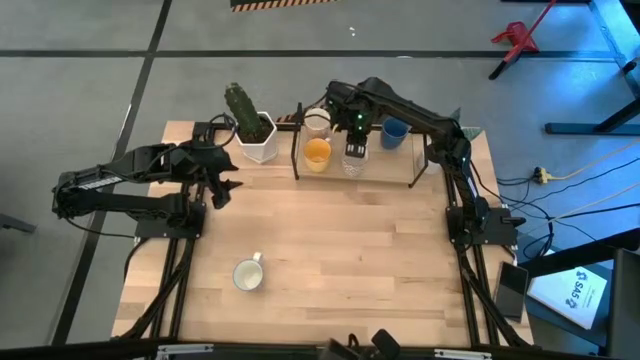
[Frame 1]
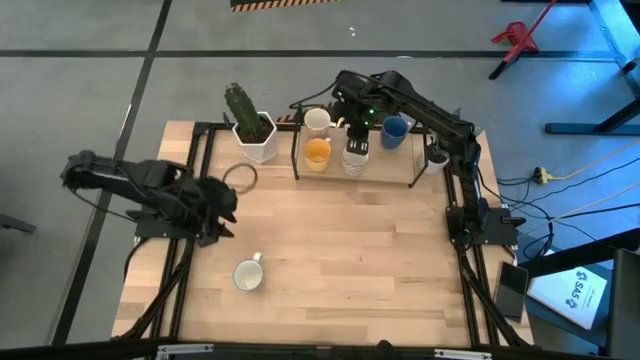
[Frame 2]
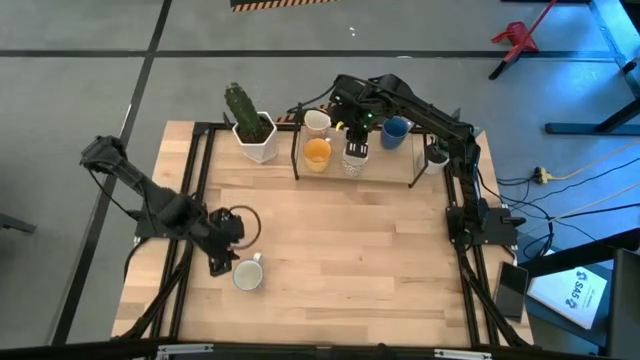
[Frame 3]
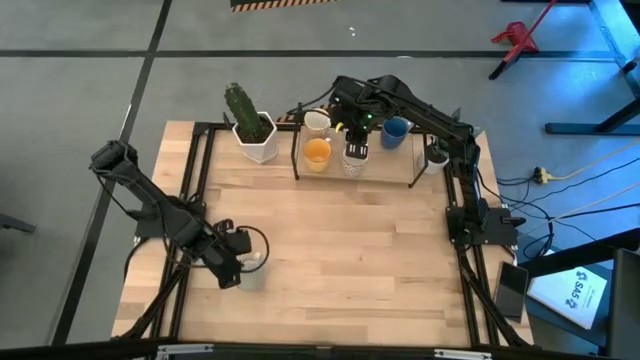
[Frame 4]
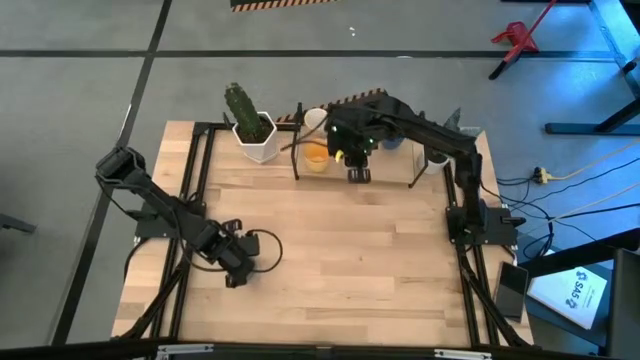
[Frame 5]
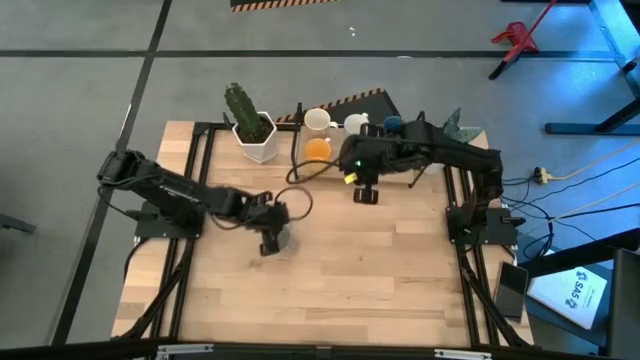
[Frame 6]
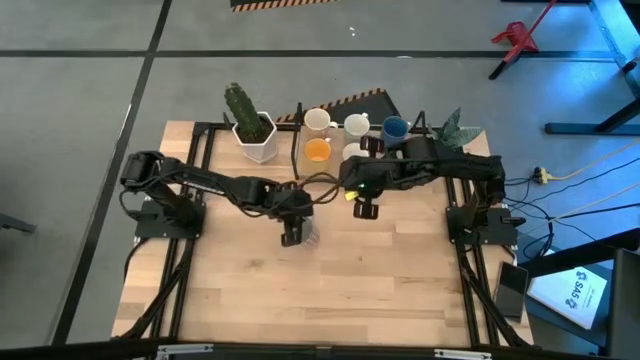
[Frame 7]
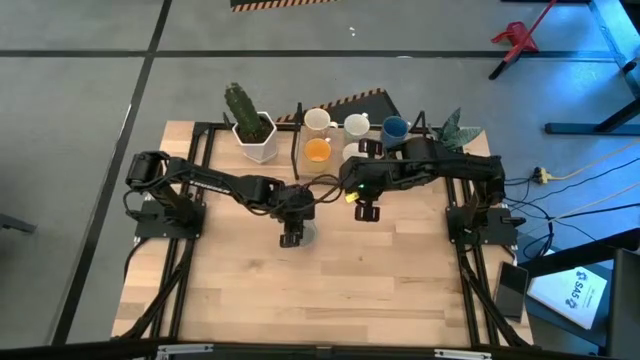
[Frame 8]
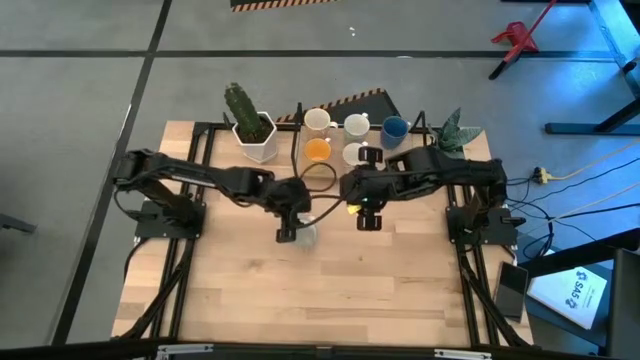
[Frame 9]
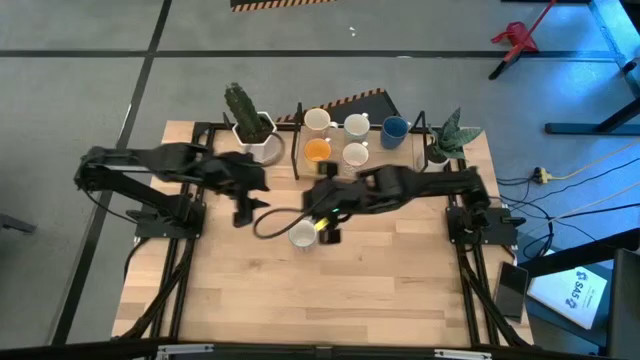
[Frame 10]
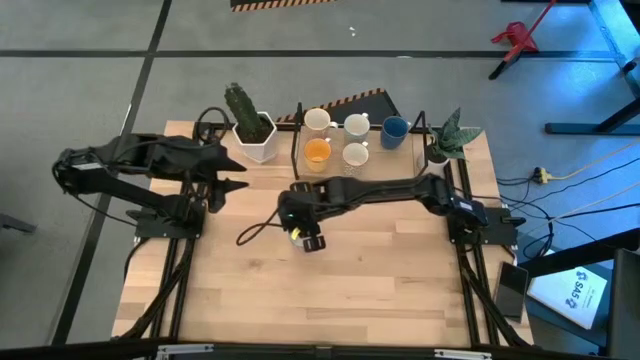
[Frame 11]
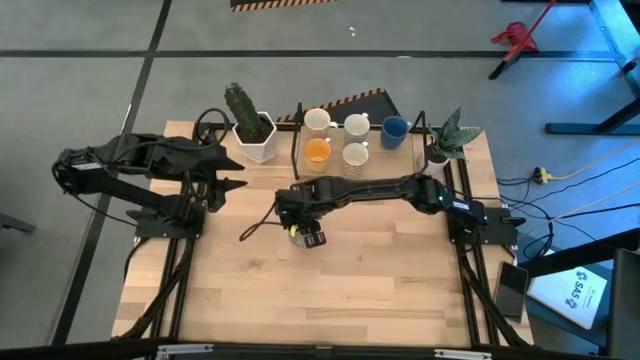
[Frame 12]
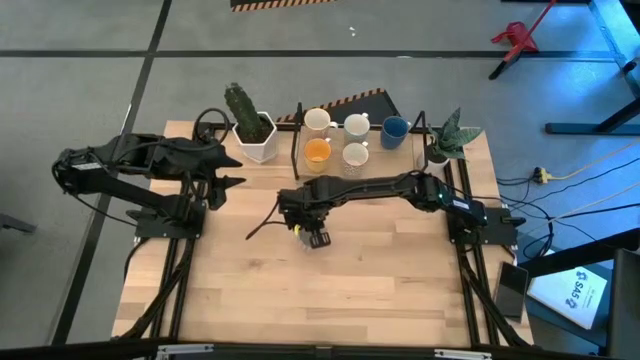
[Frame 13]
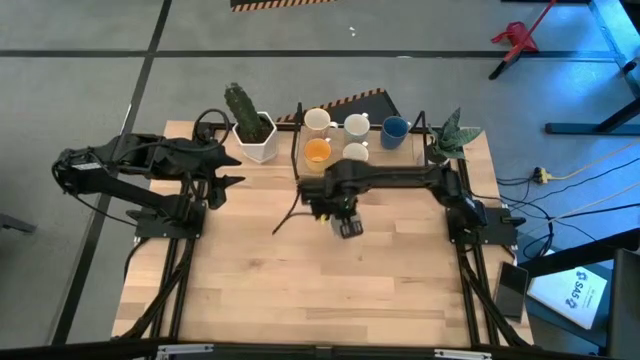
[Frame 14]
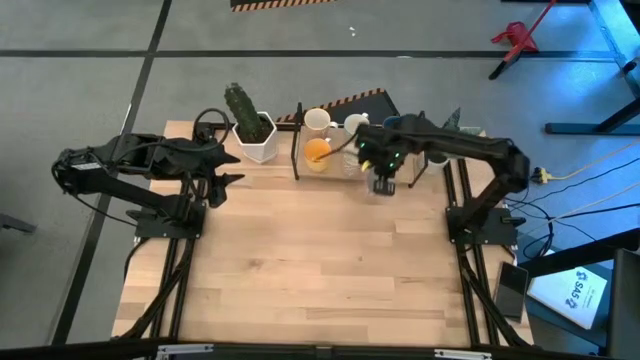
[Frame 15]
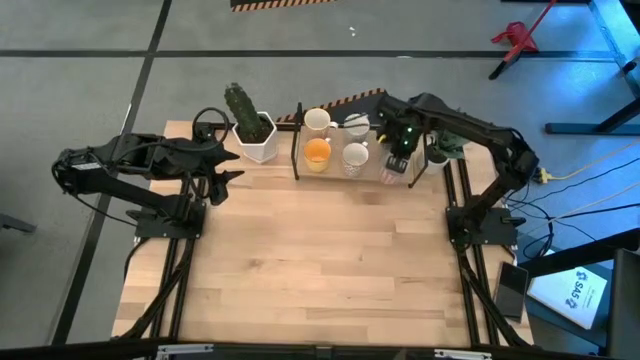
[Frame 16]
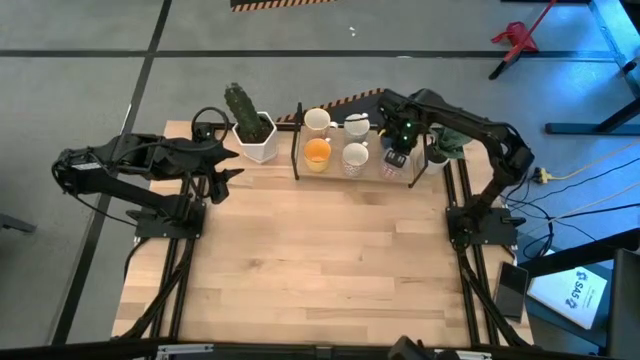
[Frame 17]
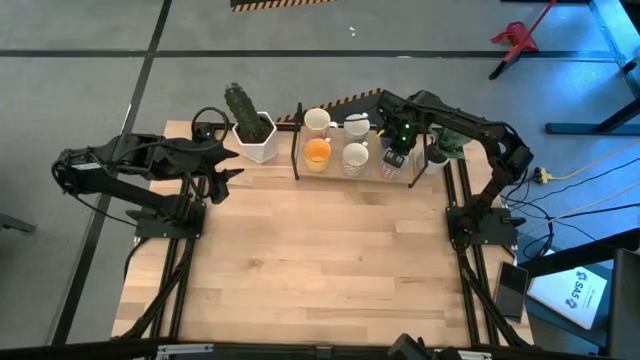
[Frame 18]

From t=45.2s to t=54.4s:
Task: Place coffee mugs
Put the red blue patterned mug on the shelf

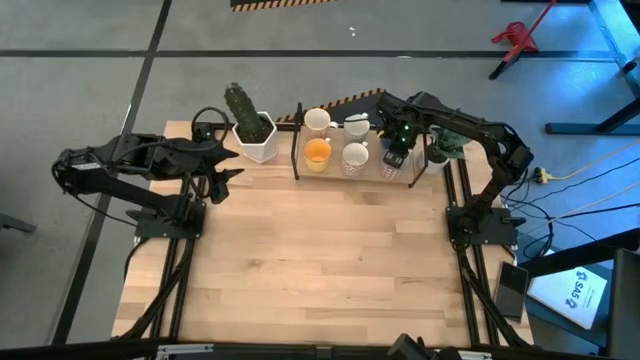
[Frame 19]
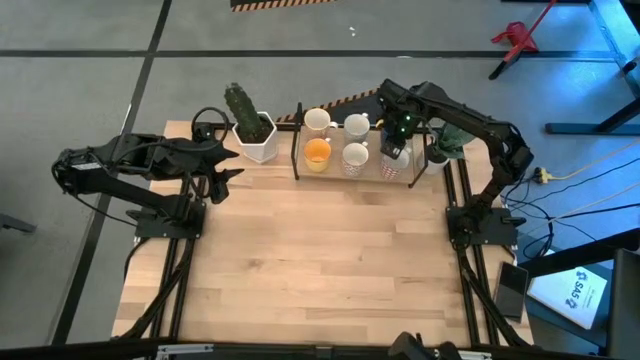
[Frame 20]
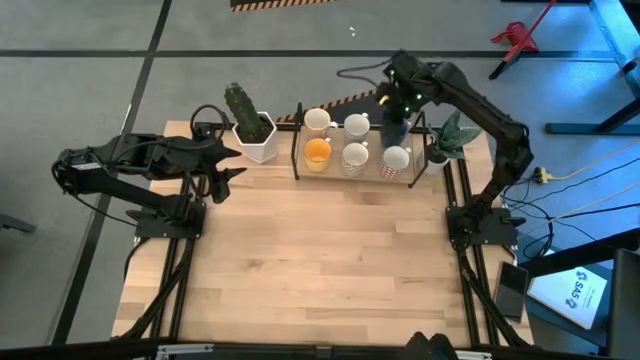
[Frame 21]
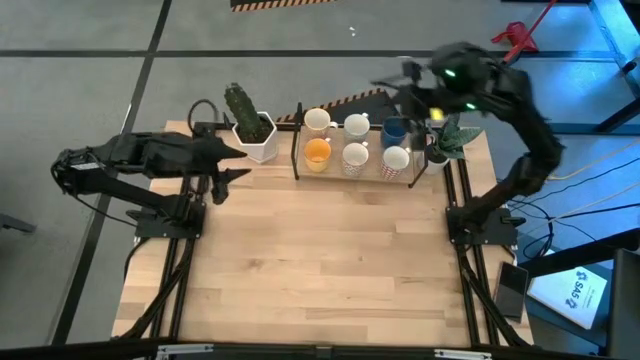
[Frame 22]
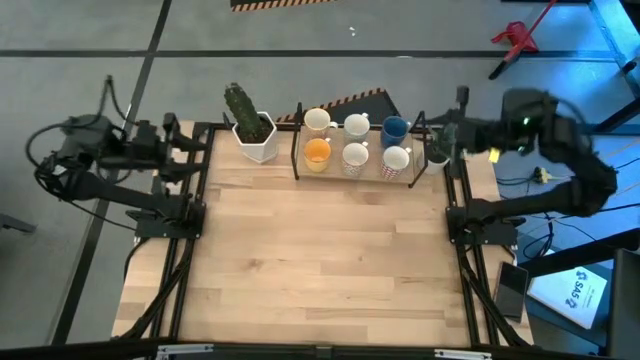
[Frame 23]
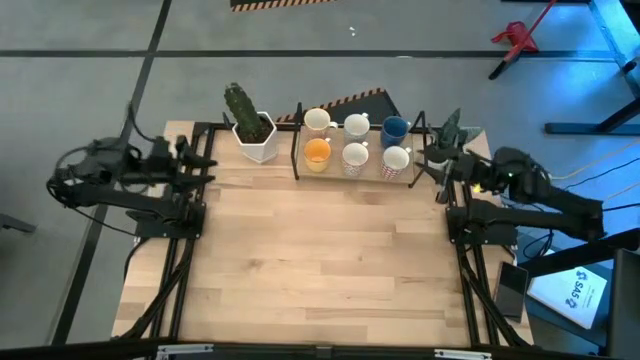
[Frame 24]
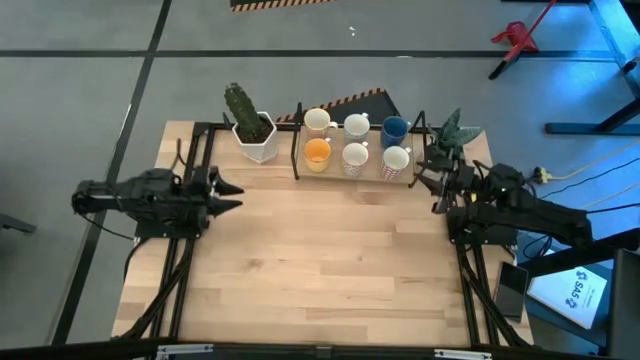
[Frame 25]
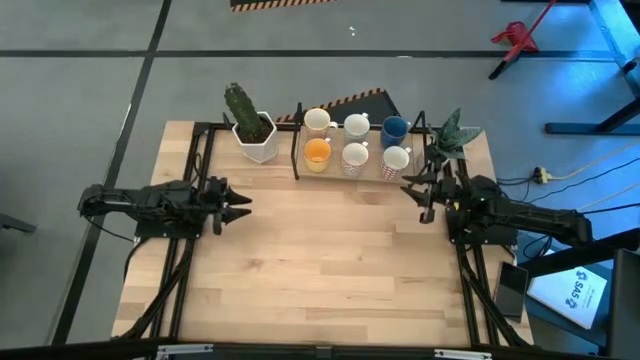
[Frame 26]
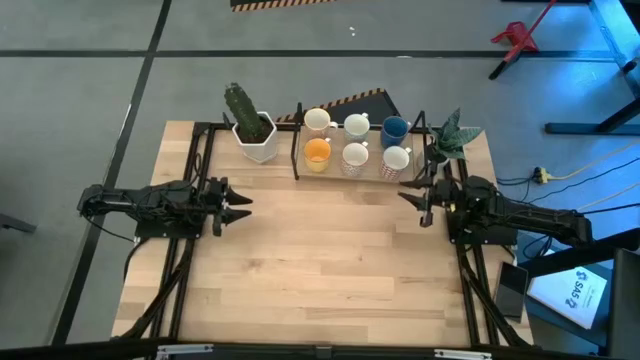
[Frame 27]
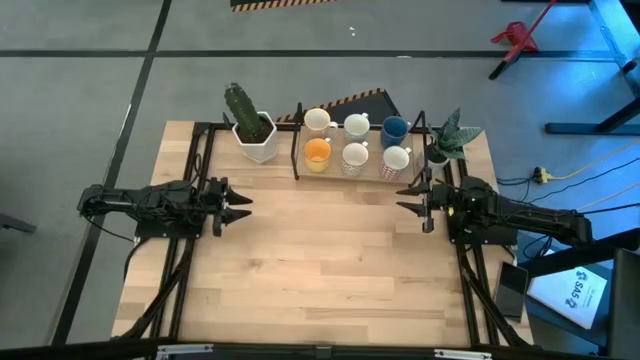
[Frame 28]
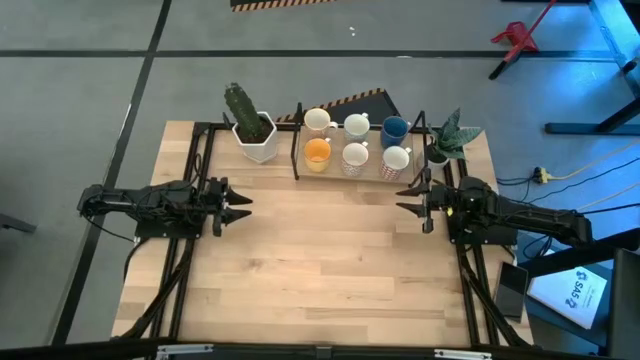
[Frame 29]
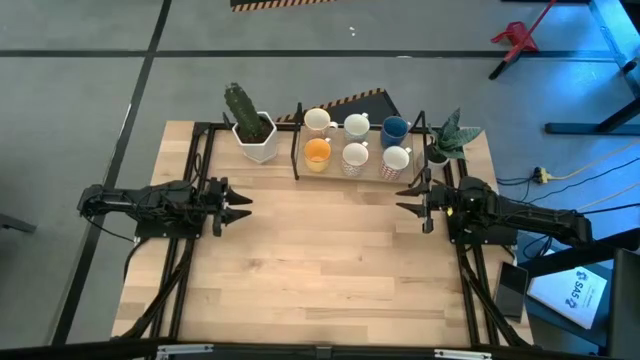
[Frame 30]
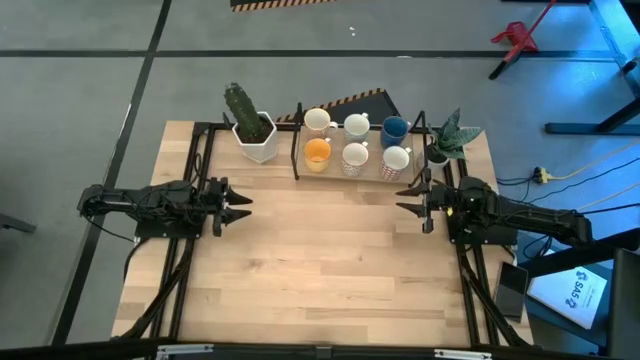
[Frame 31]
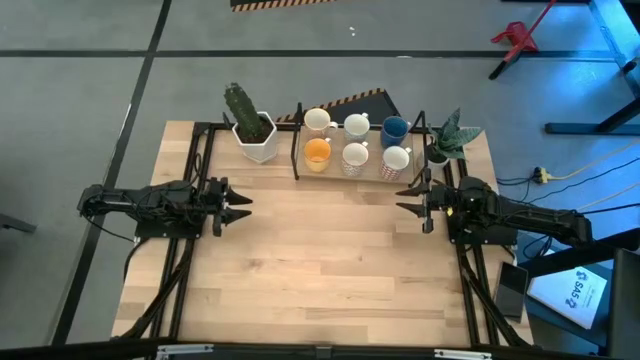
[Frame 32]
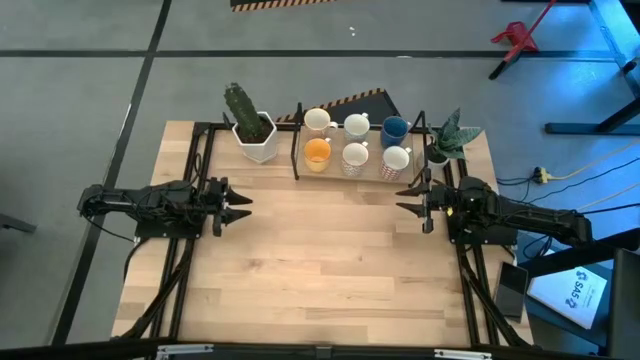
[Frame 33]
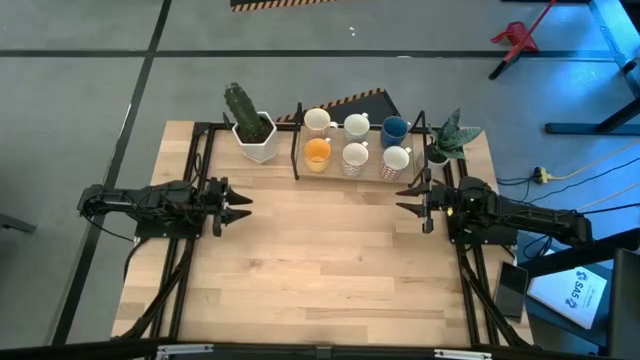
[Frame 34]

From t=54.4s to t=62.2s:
Return to Home Position

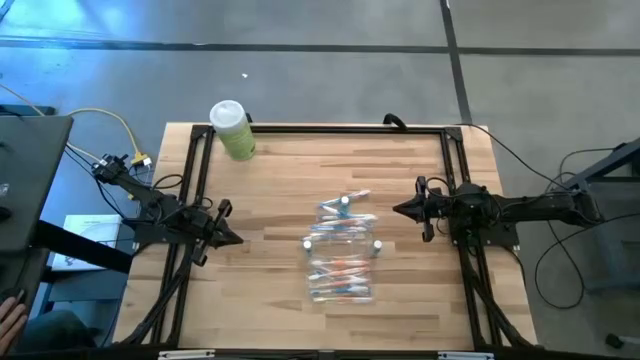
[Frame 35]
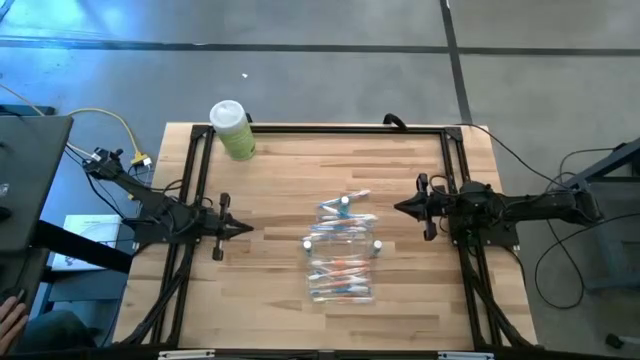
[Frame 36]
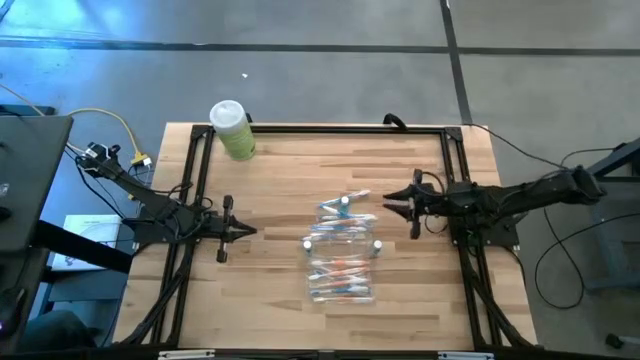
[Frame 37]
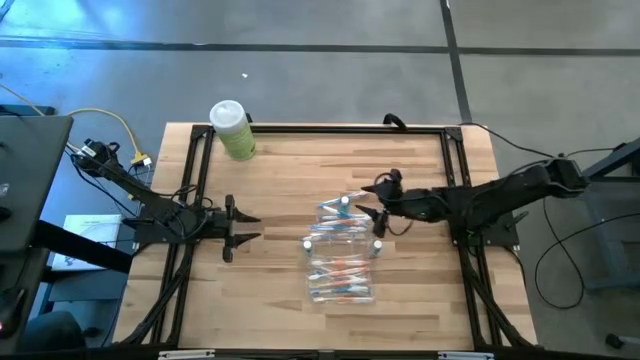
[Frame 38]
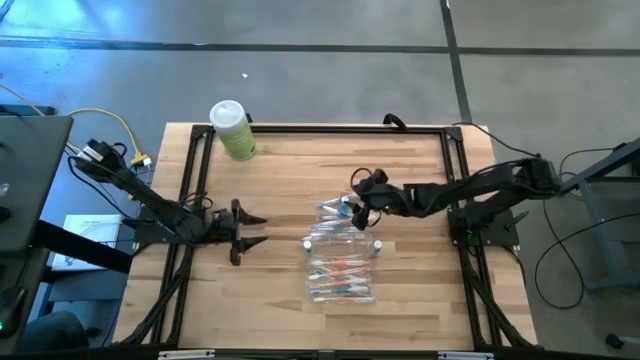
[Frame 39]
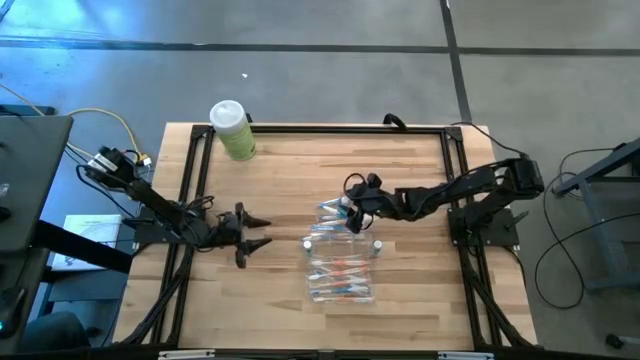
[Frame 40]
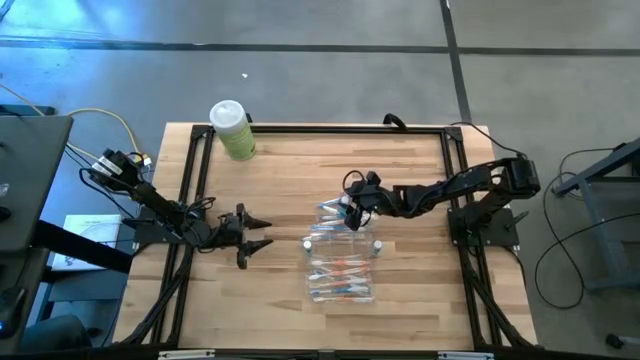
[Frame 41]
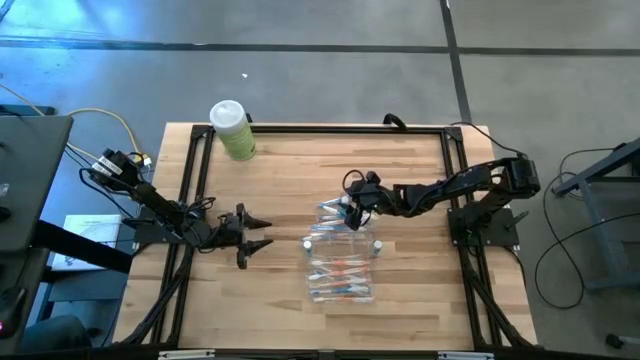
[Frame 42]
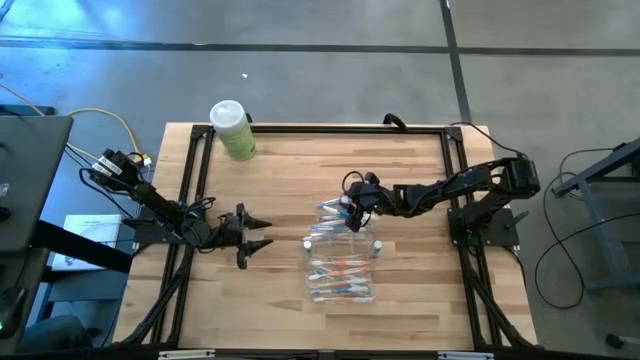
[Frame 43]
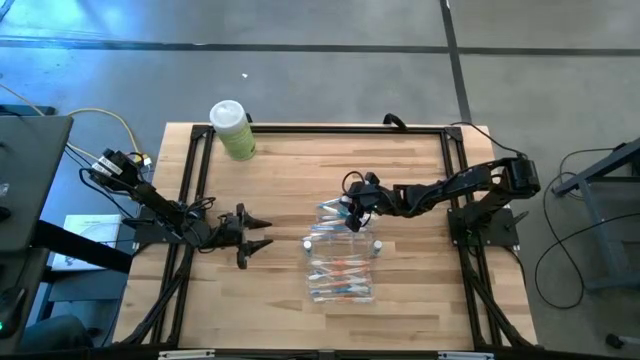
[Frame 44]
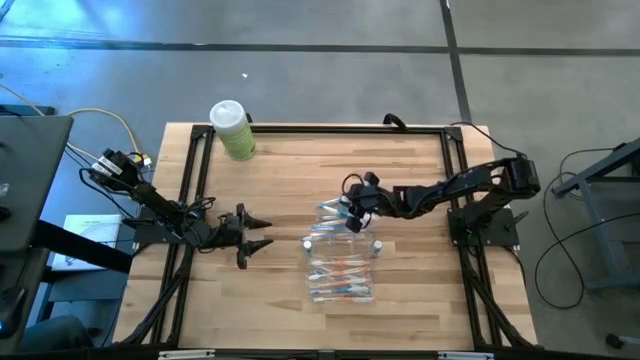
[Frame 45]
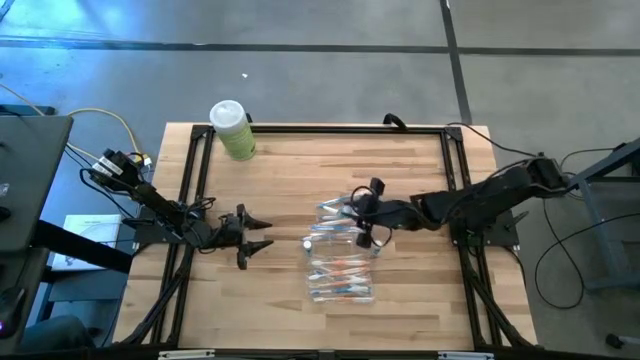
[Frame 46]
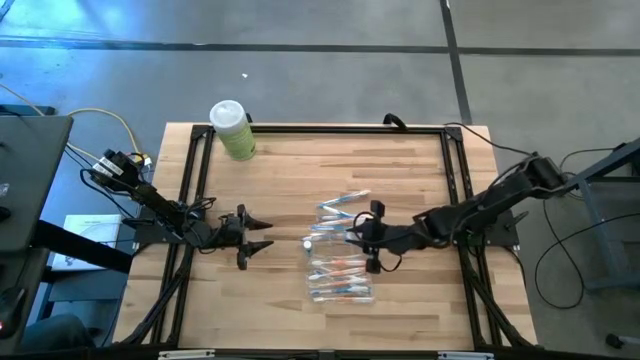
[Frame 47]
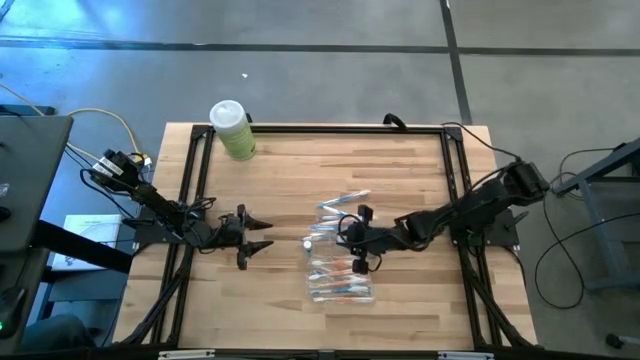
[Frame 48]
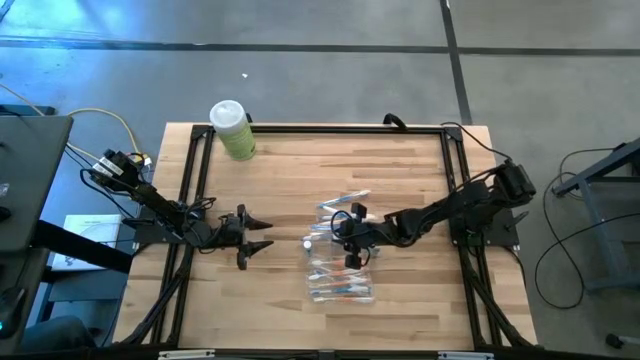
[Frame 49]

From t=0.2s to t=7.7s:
Task: Pick & Place toothbrushing station
Put the mouthwash into the transparent organizer
